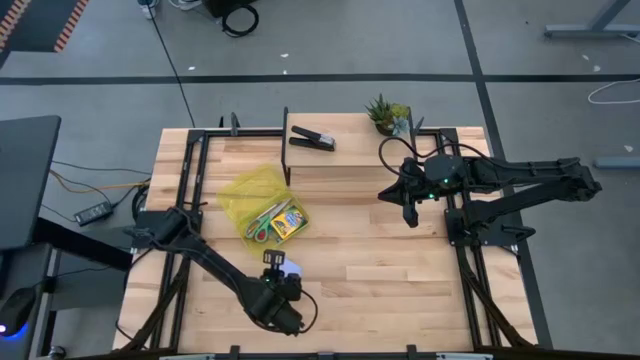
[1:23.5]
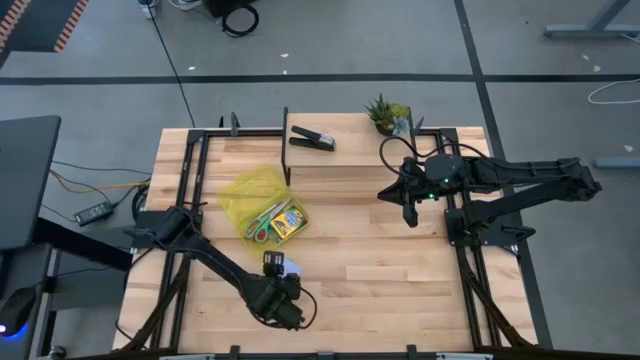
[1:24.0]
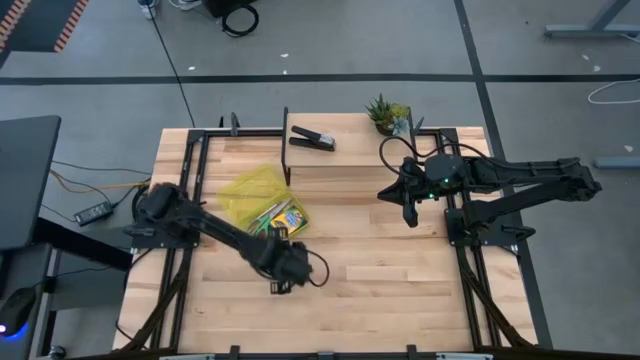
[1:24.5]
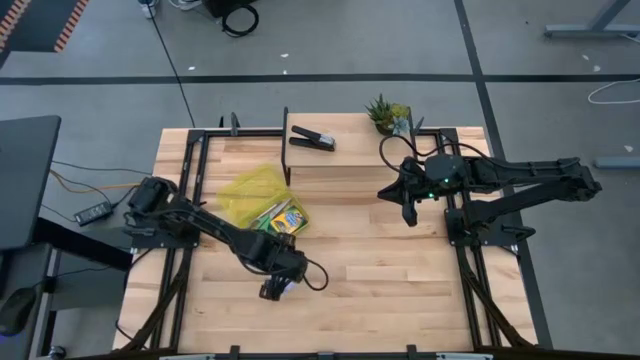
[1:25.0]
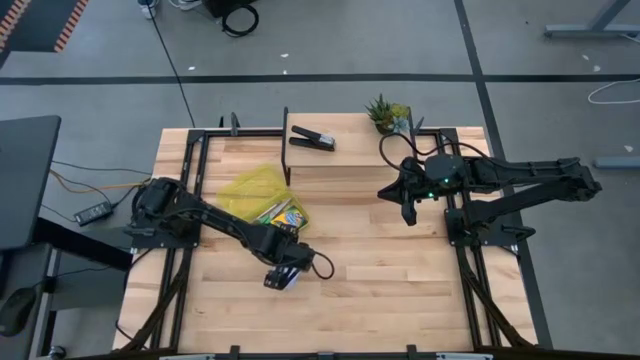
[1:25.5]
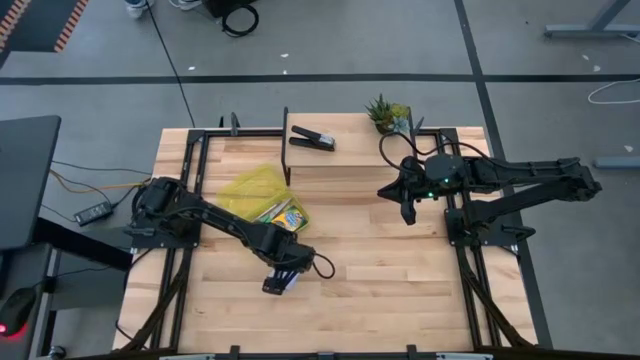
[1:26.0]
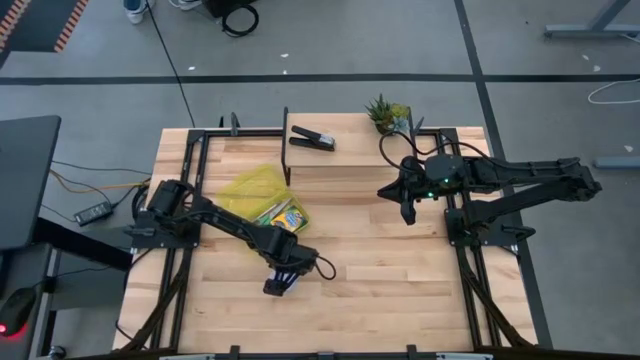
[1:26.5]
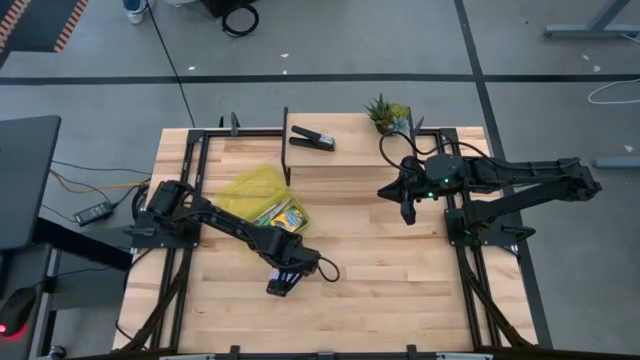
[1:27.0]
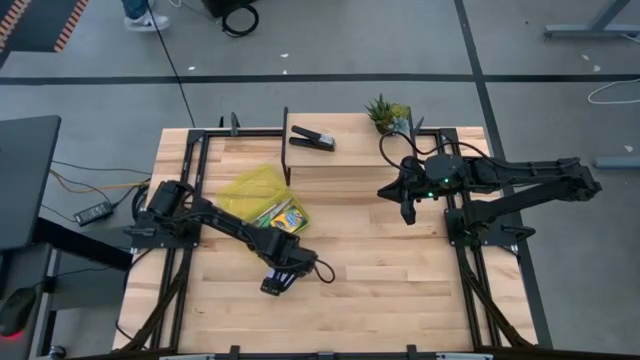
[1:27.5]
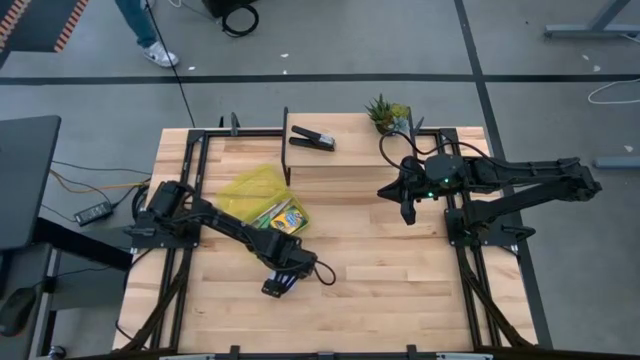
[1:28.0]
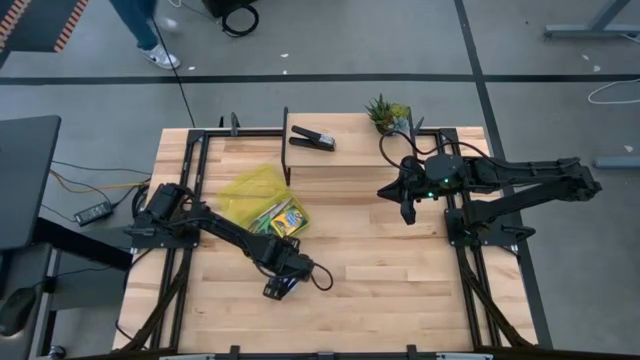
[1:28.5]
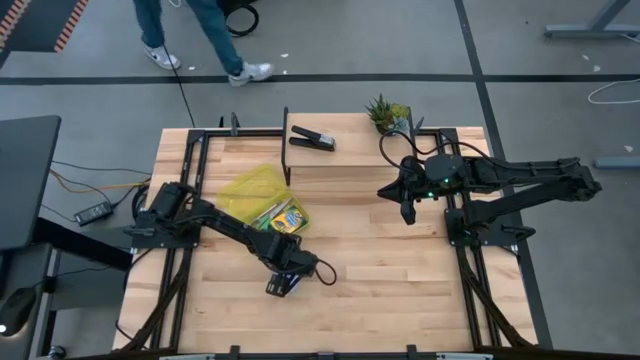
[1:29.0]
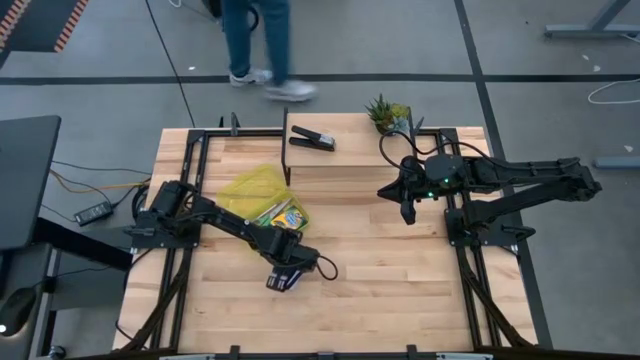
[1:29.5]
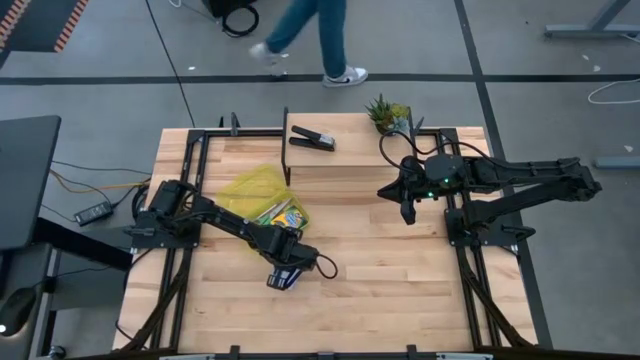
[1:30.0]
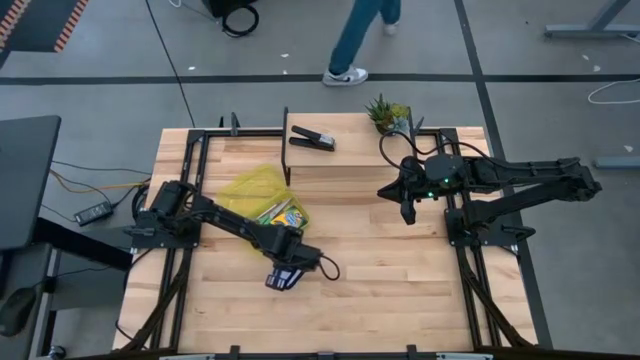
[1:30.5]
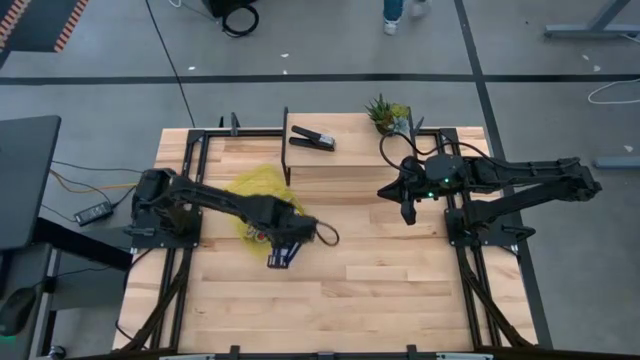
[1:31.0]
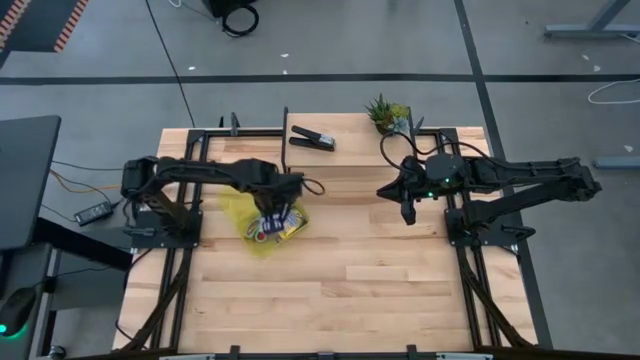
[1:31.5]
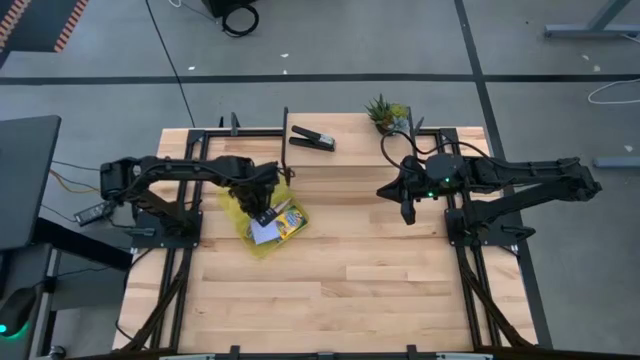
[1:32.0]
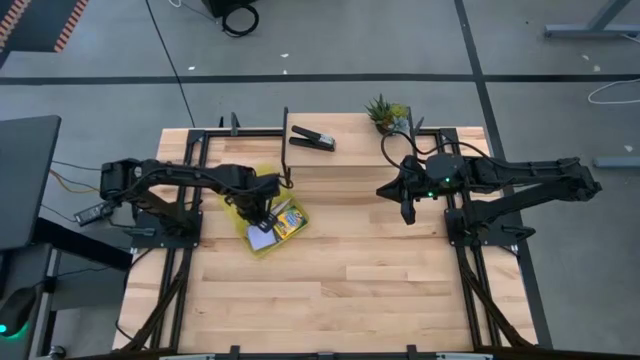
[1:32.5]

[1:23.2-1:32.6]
Task: Pack school essentials
Put the white sticky note into the yellow supply box

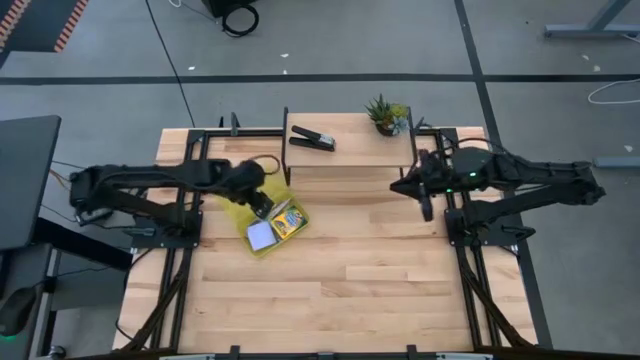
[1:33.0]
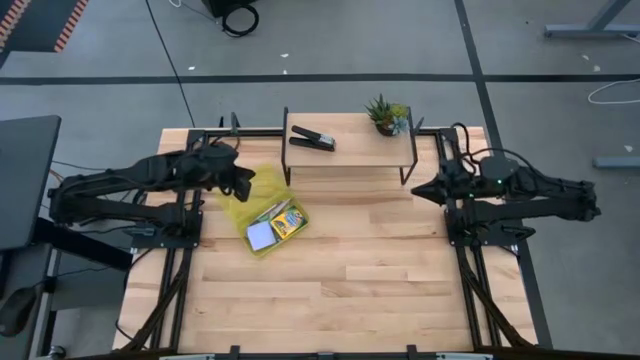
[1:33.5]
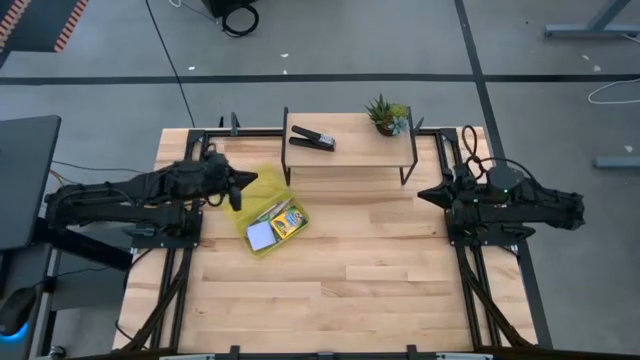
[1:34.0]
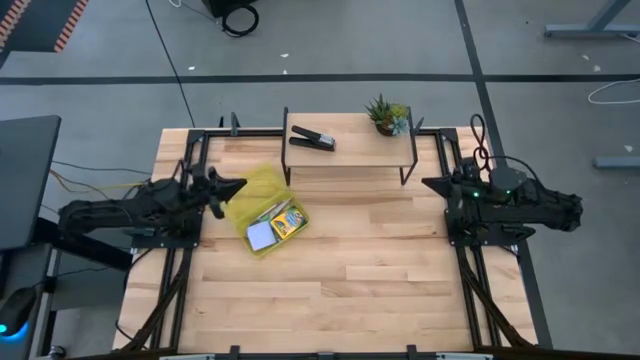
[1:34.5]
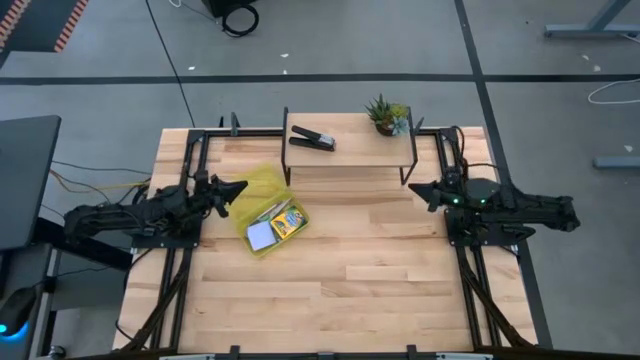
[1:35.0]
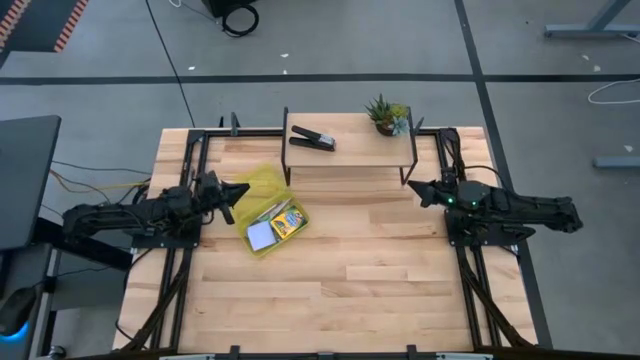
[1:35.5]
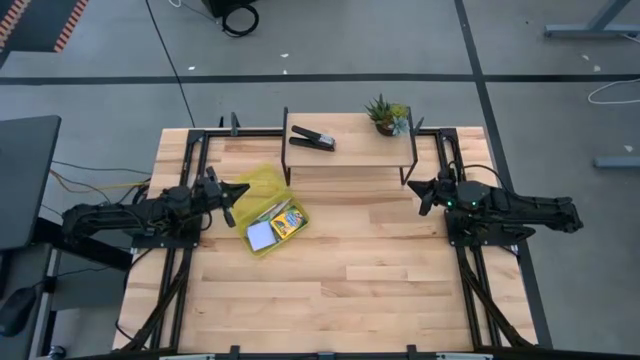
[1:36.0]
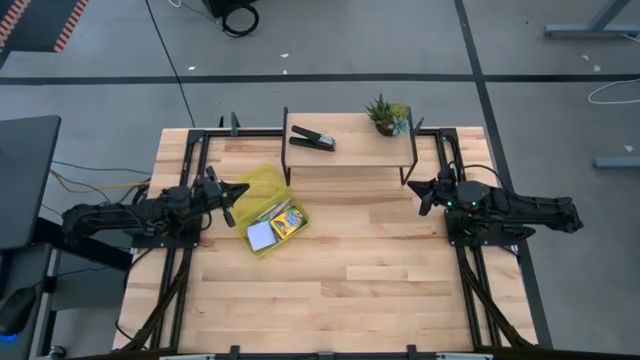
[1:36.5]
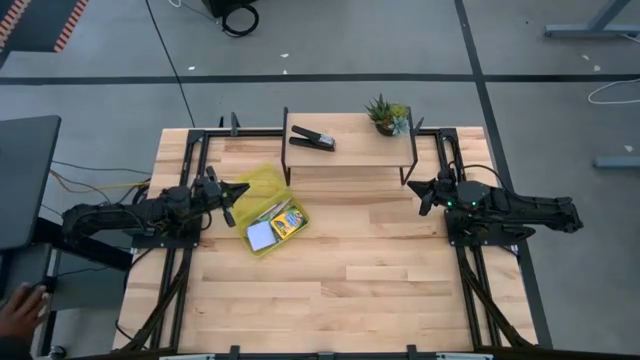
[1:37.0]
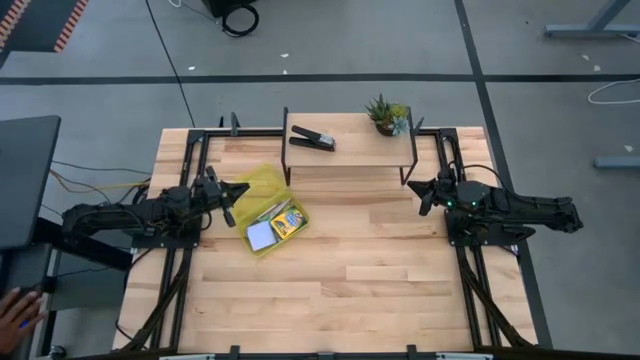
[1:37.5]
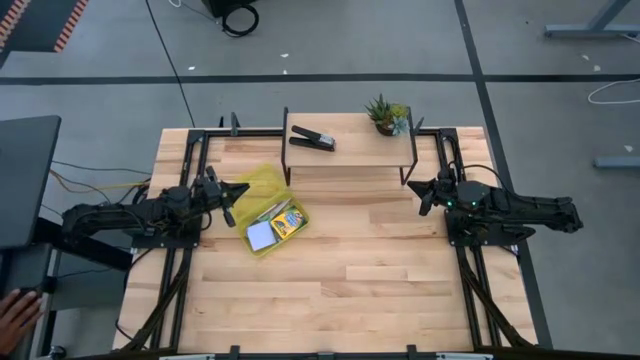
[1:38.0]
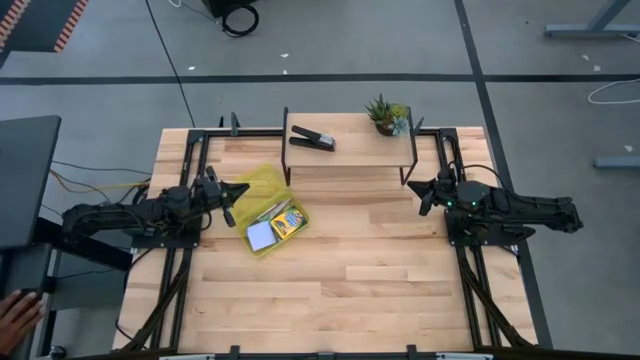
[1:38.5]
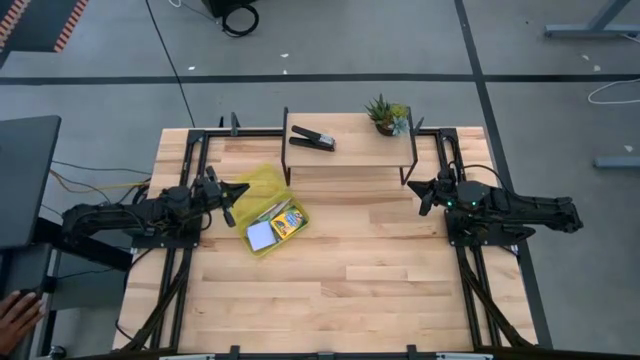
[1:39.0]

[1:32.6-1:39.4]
Return to Home Position

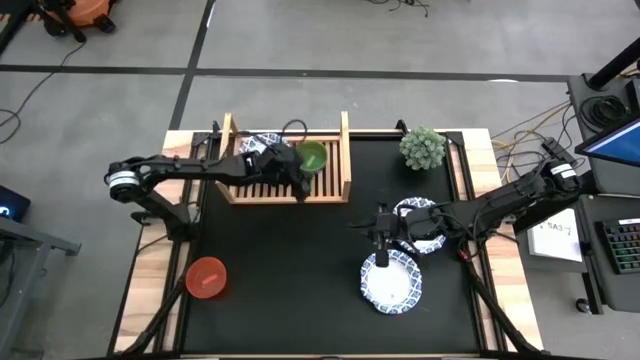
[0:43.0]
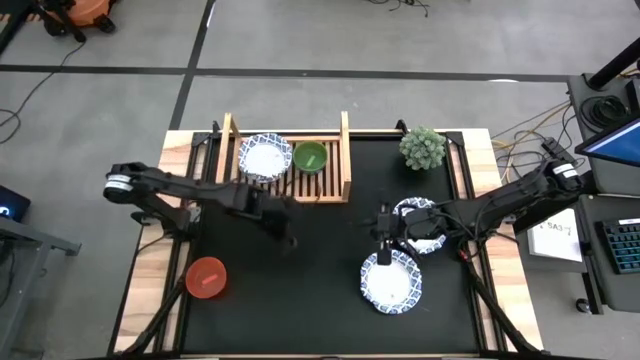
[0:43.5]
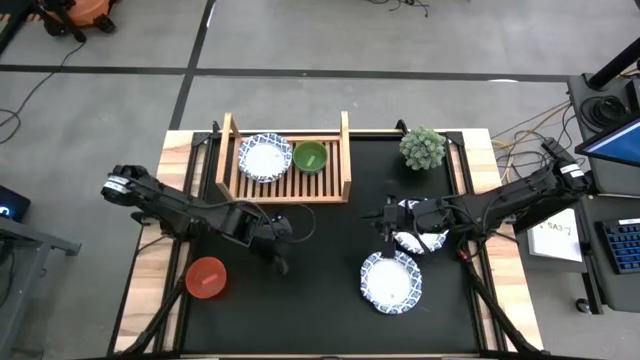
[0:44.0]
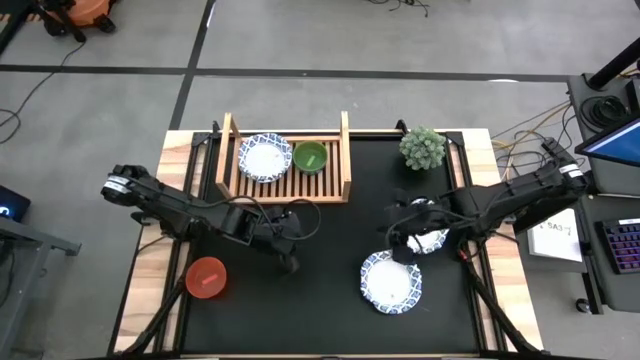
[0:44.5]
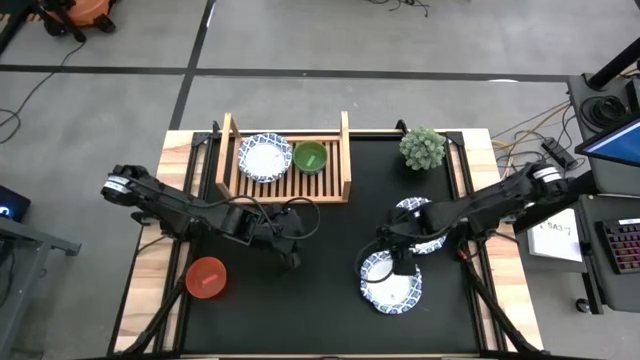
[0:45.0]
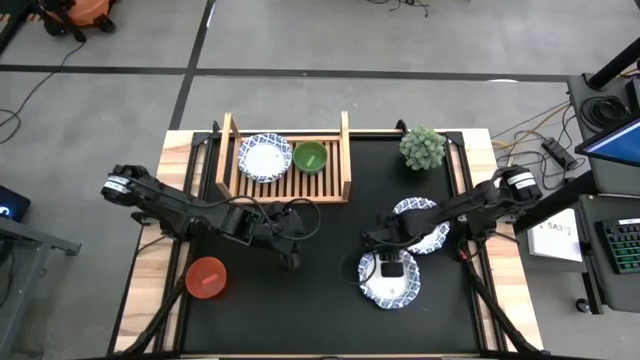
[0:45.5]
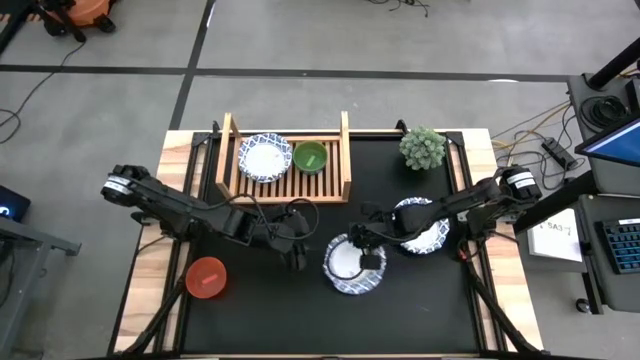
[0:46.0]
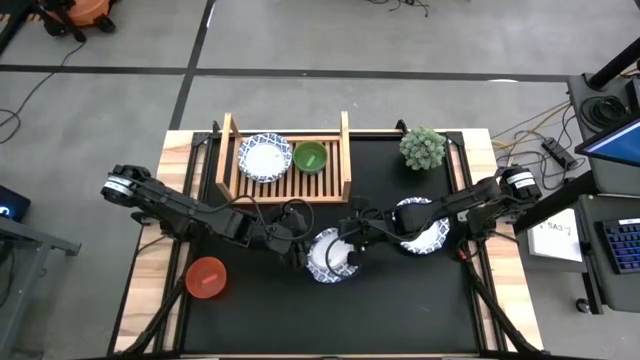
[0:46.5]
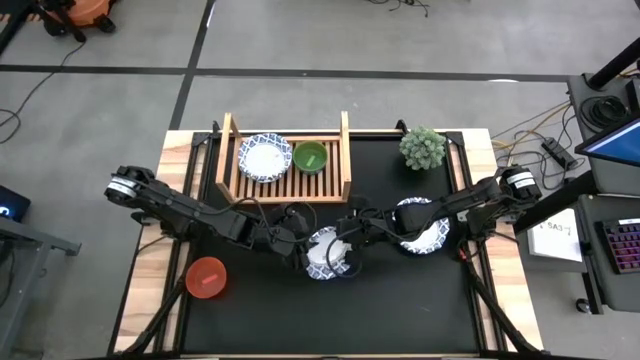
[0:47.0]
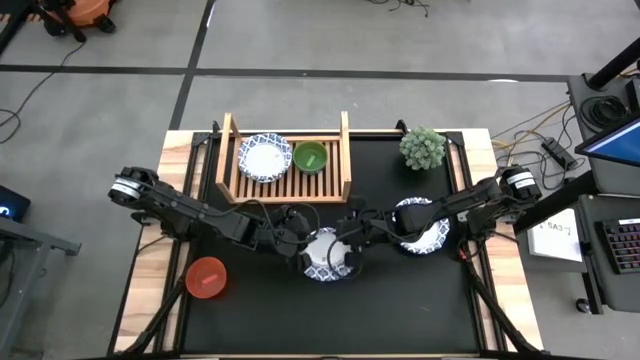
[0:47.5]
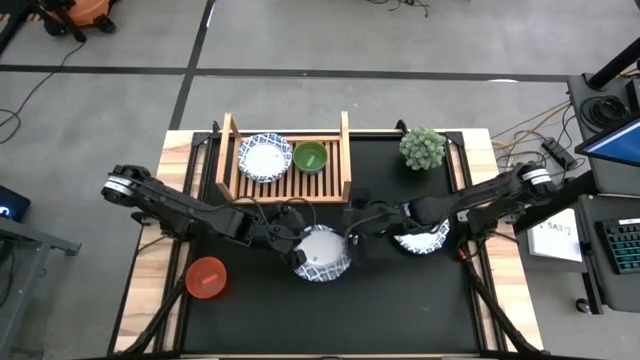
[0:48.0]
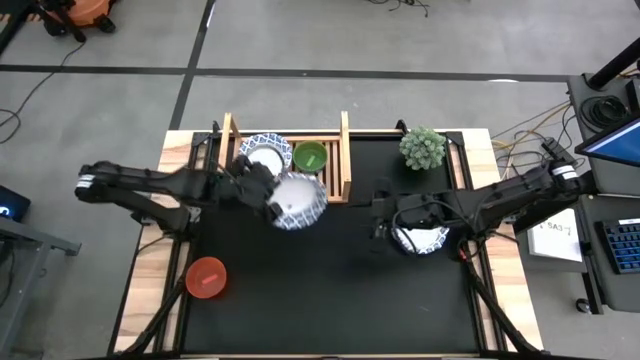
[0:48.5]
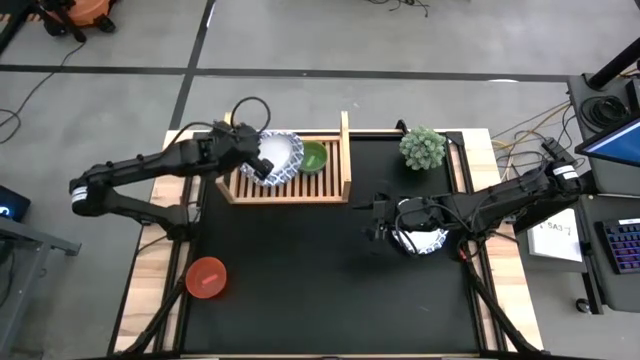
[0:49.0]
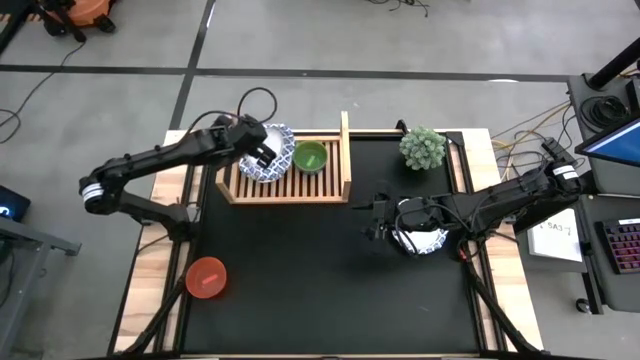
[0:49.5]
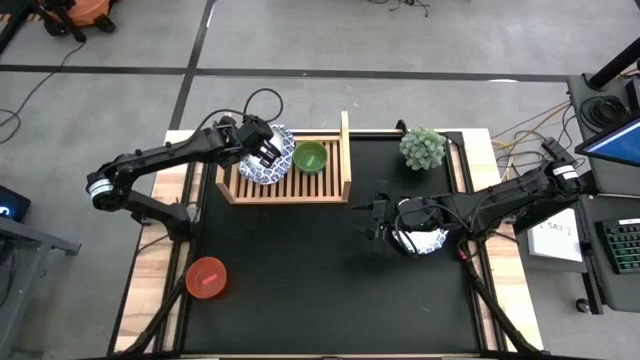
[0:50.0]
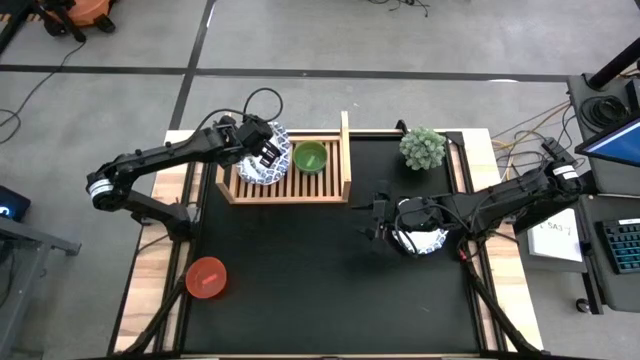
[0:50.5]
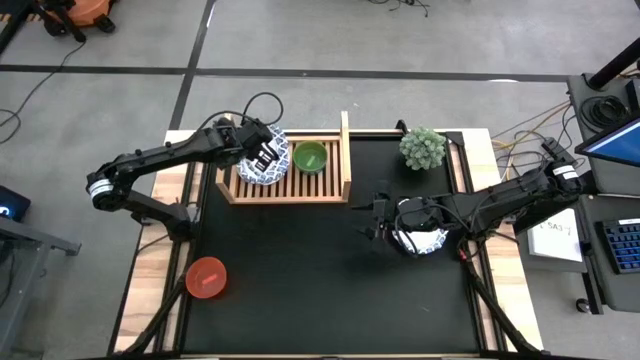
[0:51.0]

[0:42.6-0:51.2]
Task: Place and stack bowls onto a shelf
Stack the blue patterned bowl on top of the blue patterned bowl on the shelf
